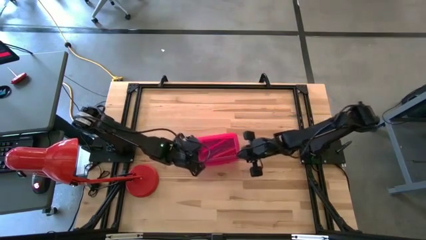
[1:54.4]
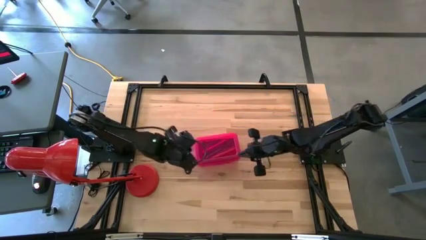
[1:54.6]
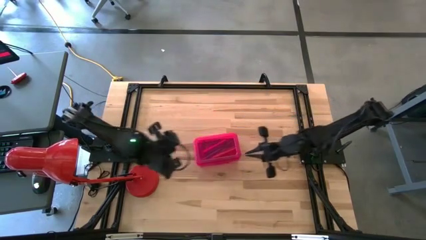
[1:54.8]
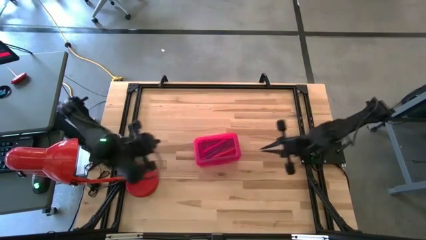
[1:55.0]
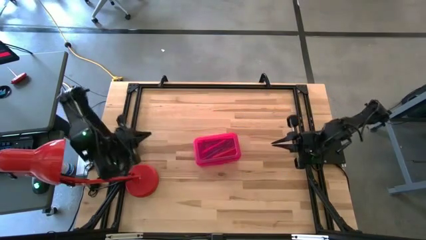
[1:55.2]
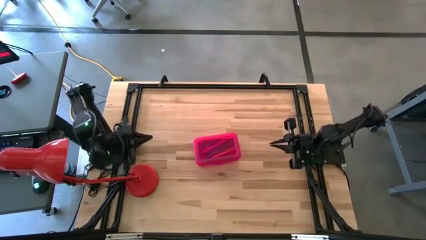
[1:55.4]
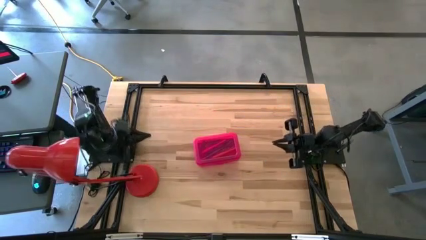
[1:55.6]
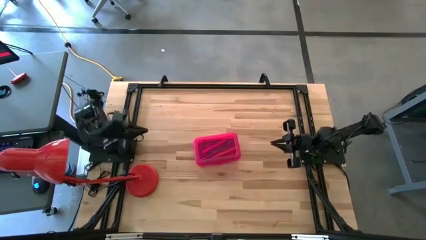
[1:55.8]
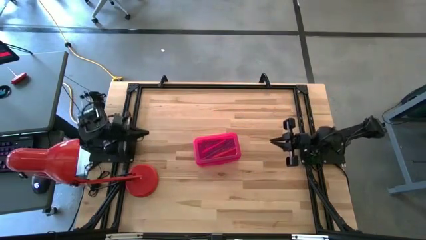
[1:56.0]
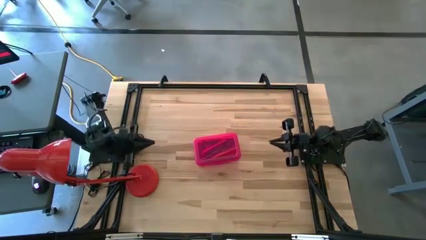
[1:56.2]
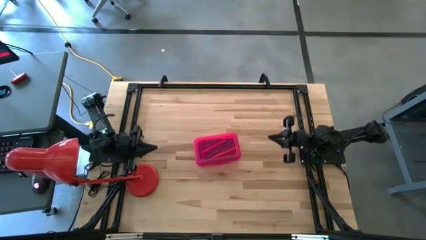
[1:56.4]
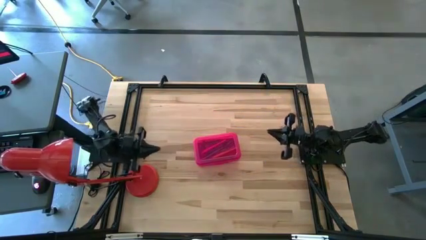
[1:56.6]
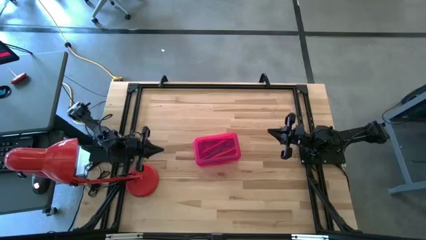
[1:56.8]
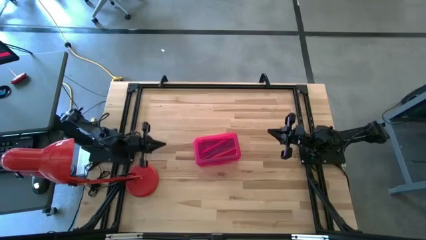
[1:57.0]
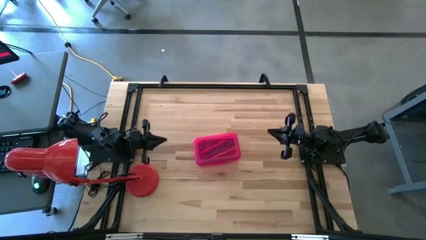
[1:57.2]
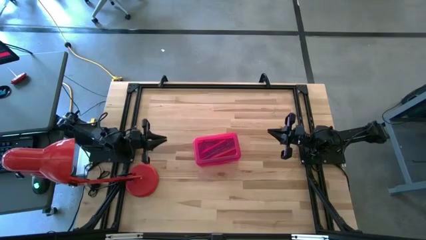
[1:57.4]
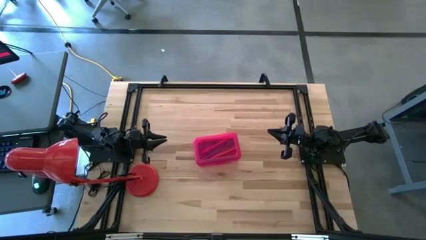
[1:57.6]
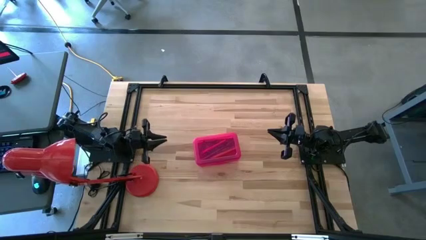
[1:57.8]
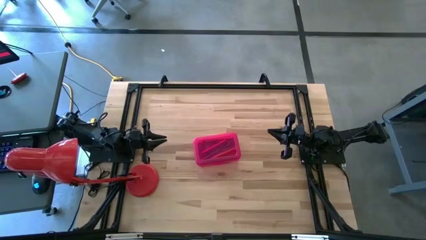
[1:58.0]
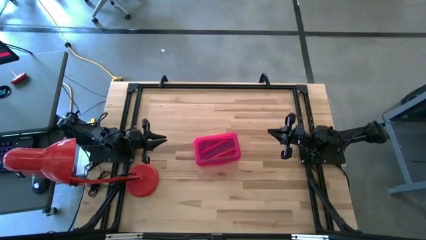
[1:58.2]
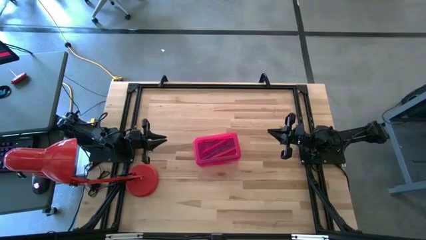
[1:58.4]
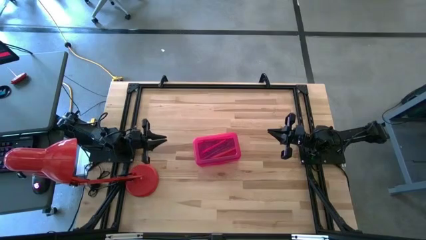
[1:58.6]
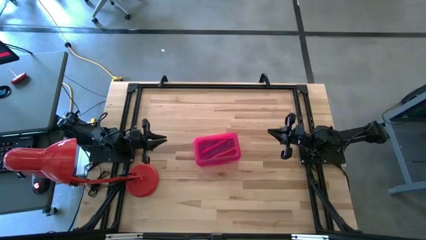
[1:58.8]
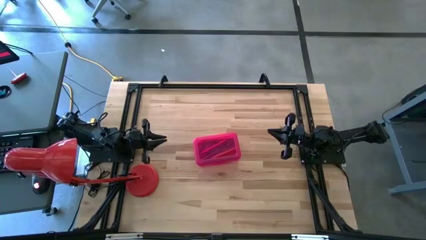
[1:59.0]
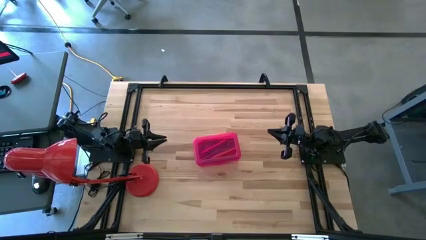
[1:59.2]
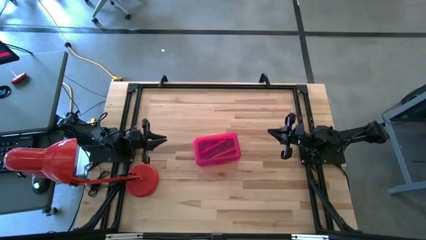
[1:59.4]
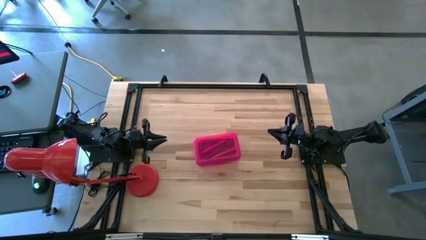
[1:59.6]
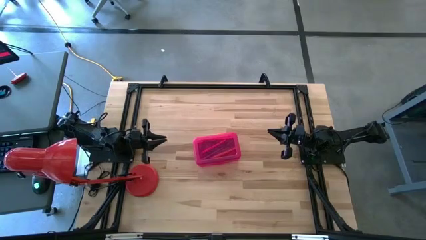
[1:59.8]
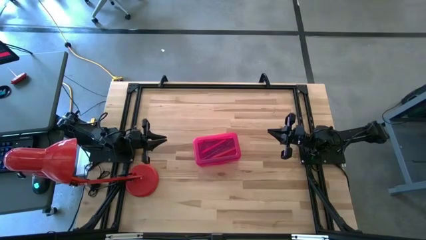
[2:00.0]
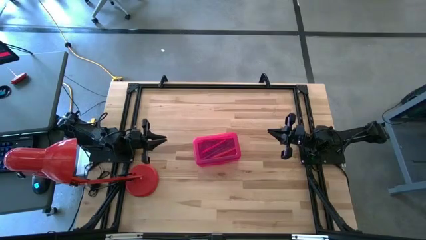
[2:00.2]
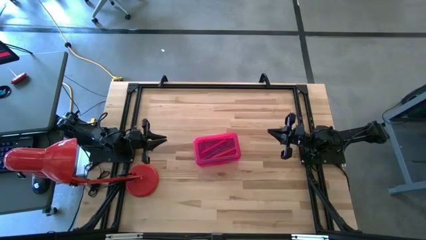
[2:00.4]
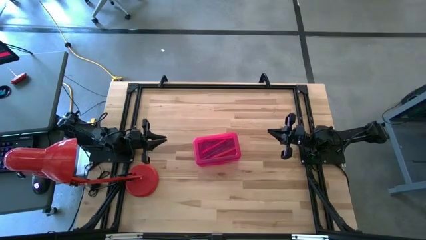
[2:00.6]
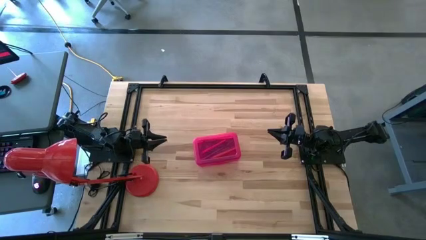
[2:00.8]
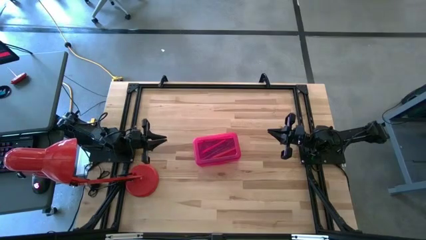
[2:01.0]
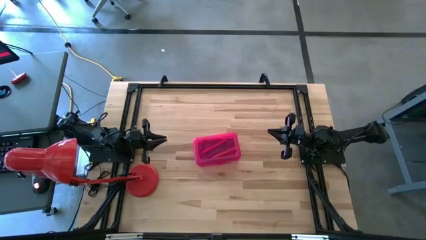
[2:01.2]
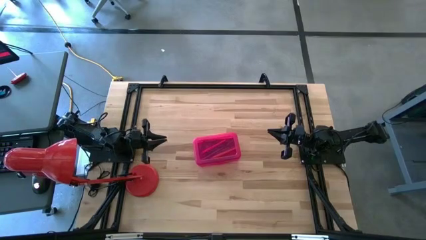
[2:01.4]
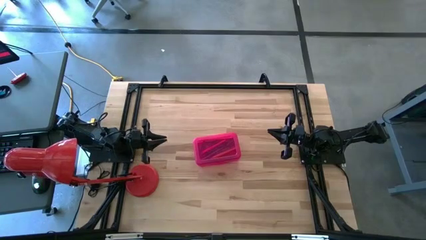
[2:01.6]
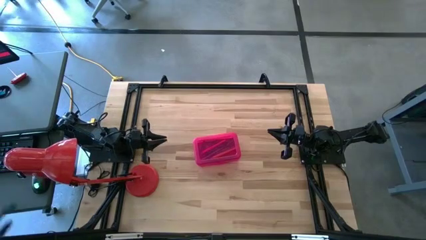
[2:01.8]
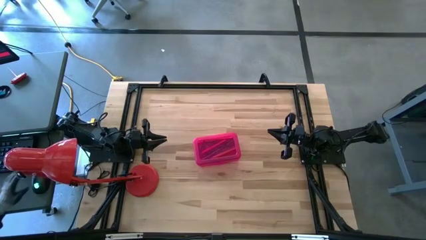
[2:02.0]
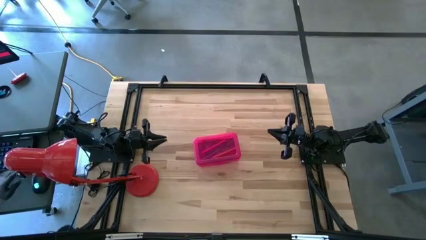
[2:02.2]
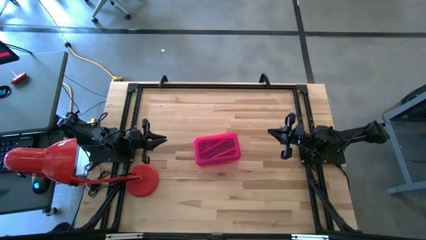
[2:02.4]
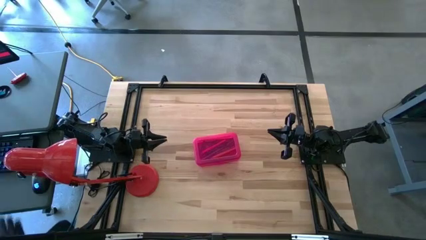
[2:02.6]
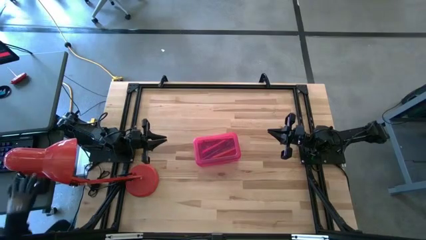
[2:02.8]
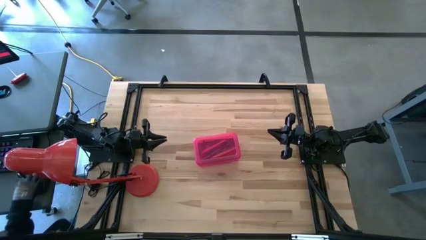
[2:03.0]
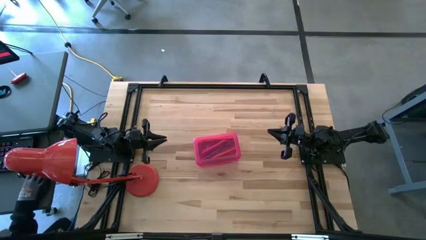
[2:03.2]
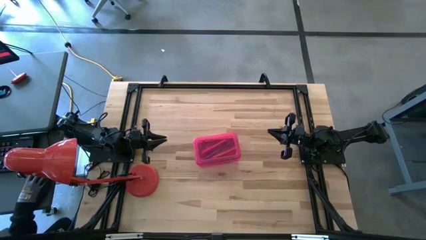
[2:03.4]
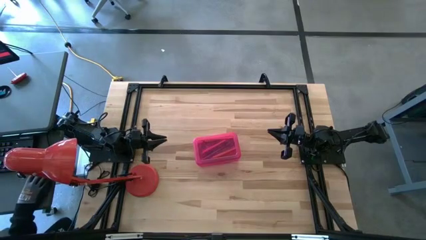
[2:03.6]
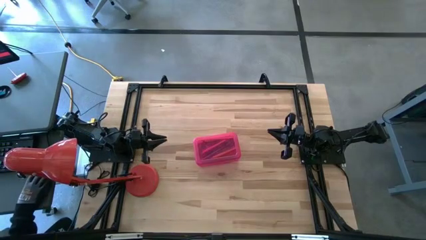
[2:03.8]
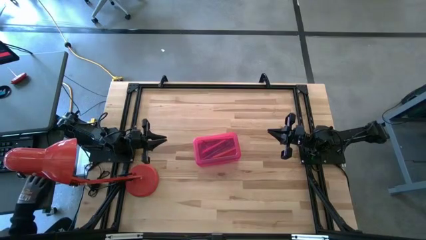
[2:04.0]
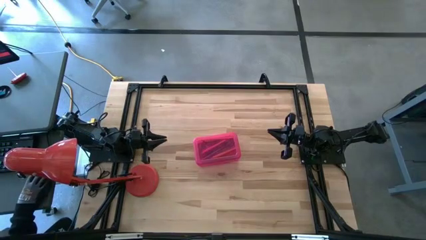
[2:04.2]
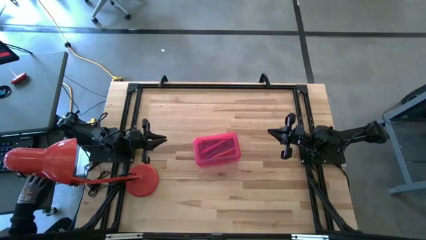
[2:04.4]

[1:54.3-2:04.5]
Task: Pick & place school supplies into a supply box
Return to Home Position

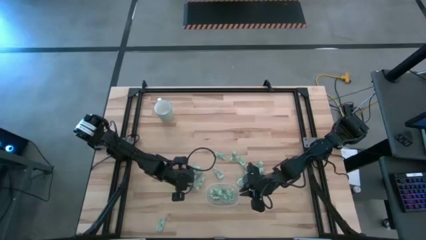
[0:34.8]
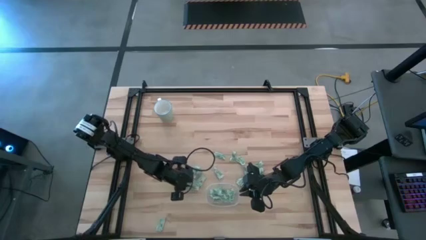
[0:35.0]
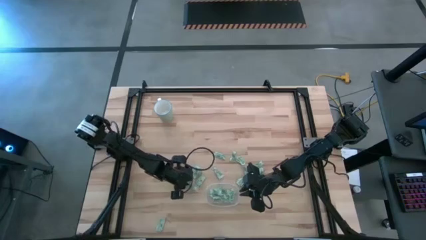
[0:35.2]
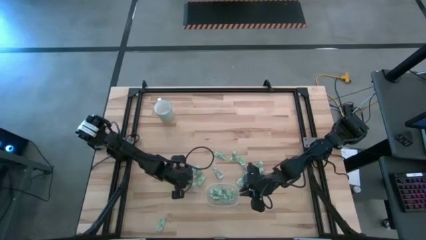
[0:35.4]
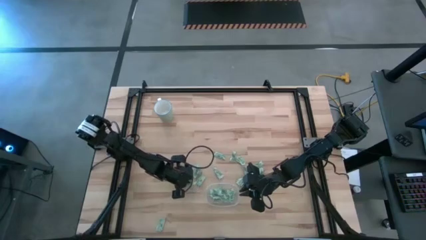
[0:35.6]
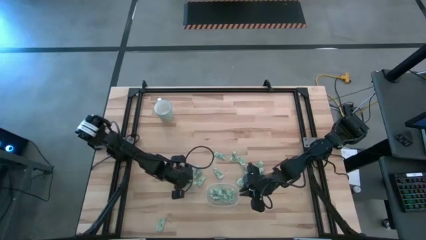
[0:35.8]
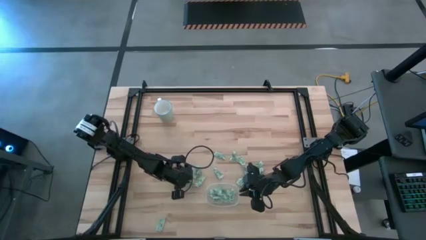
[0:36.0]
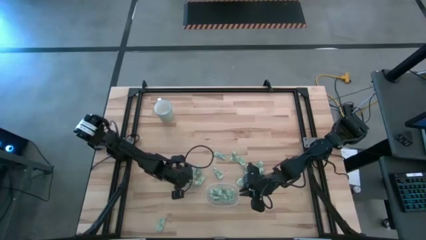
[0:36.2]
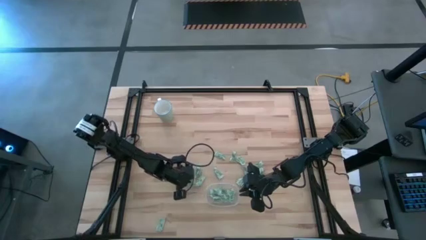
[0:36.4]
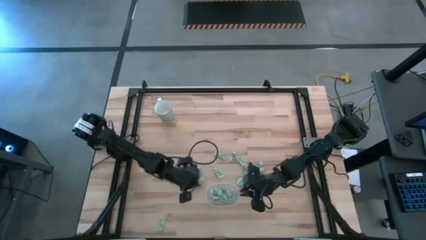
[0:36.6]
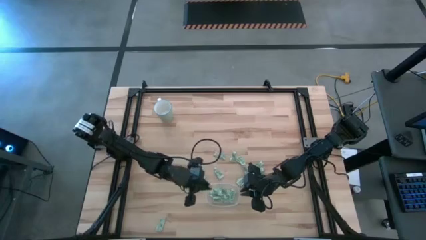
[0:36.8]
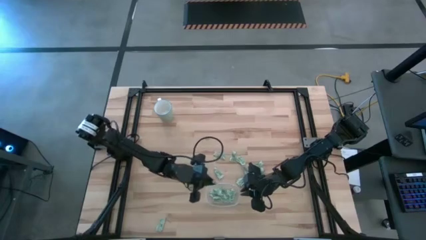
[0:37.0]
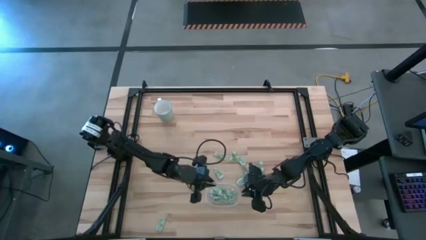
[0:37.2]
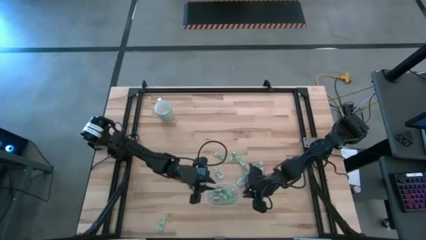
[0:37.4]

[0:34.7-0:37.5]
Task: Pick and place Stevia / Truvia into bins
Put the stevia packet into the transparent container

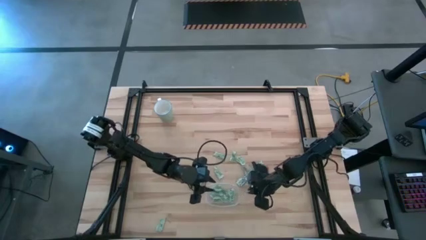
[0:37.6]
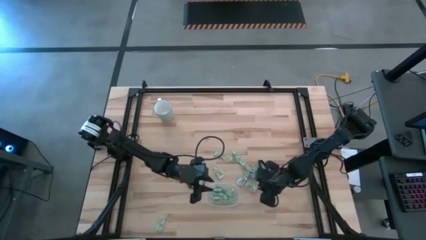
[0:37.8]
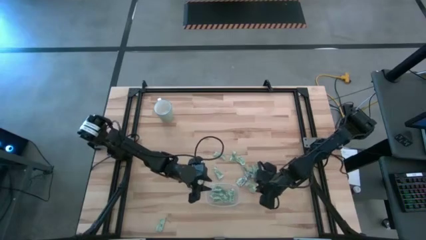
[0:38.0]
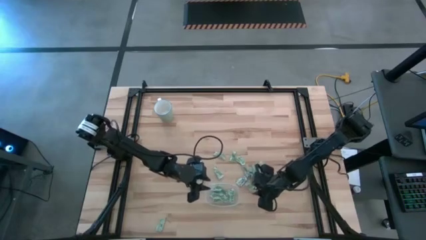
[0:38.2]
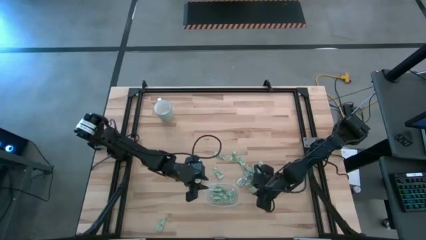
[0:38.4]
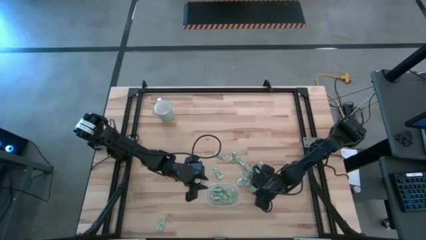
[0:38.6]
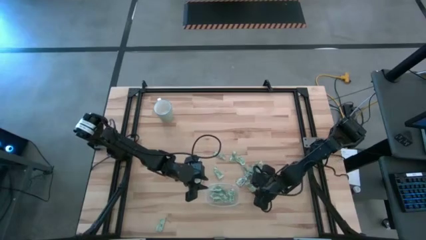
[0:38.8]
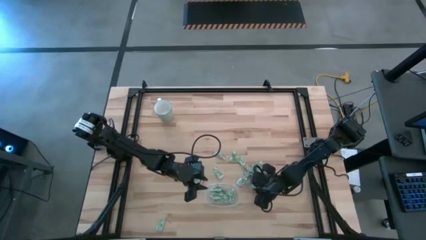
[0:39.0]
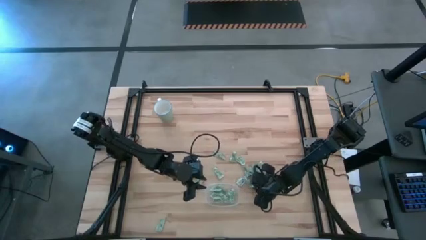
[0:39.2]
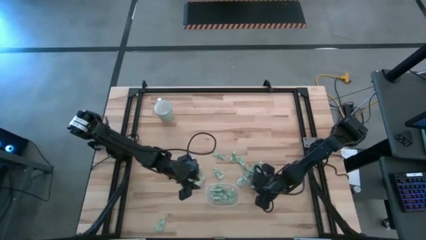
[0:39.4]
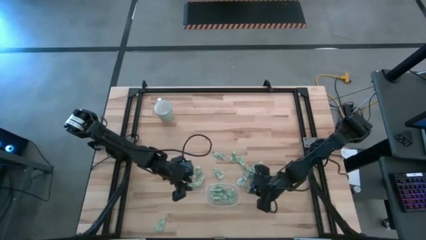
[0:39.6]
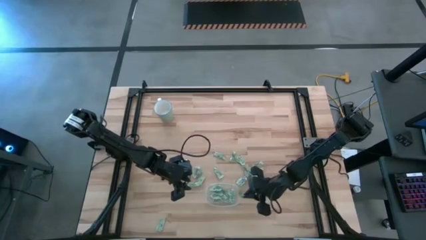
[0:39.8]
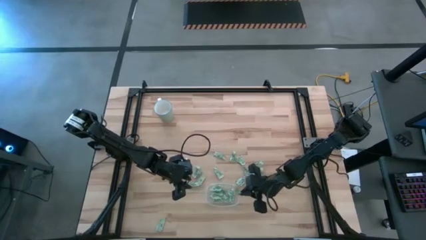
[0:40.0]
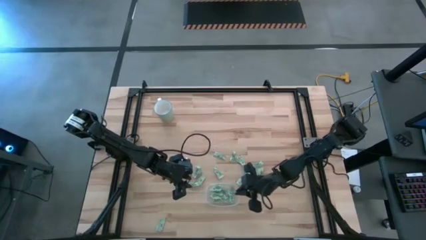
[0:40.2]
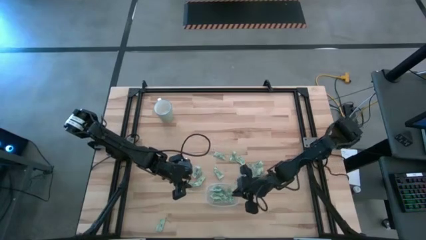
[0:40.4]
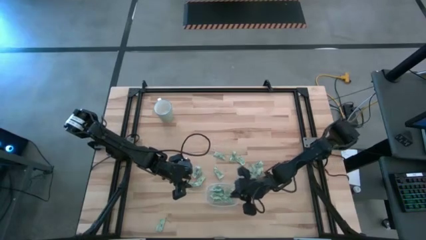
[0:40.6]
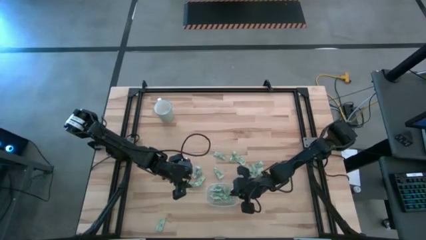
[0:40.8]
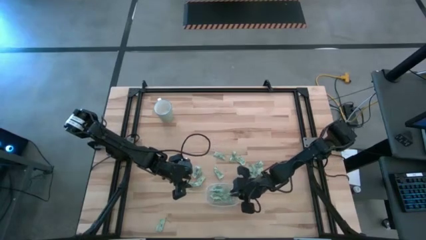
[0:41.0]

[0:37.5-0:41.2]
Put the stevia packet into the transparent container
